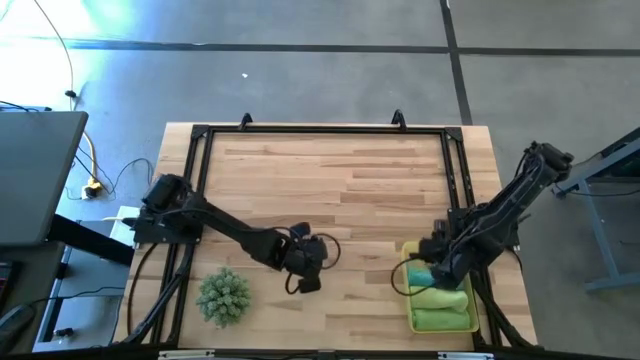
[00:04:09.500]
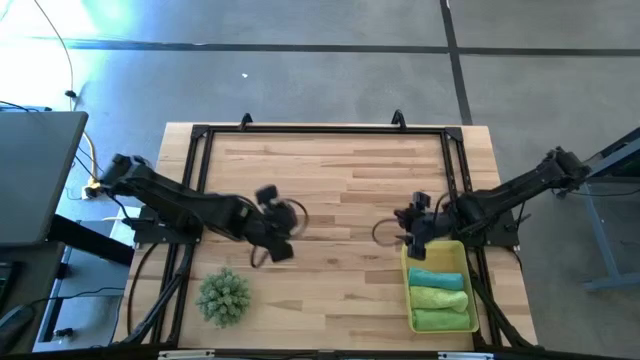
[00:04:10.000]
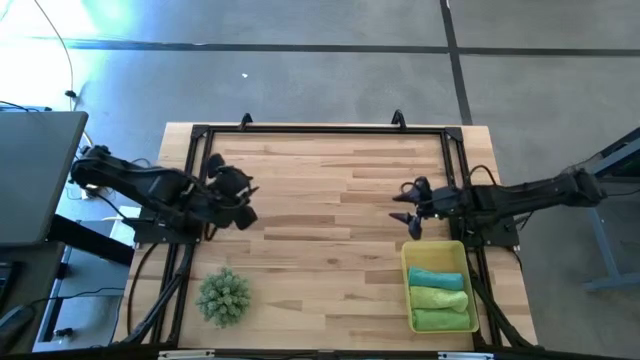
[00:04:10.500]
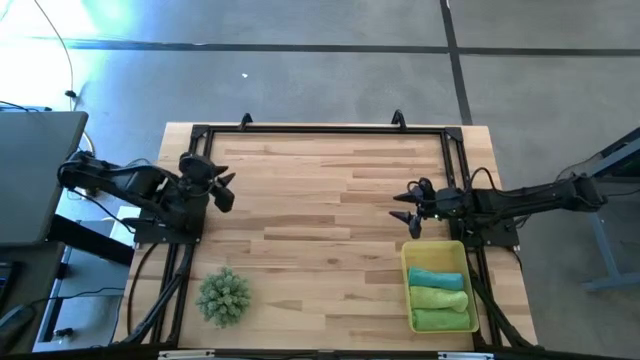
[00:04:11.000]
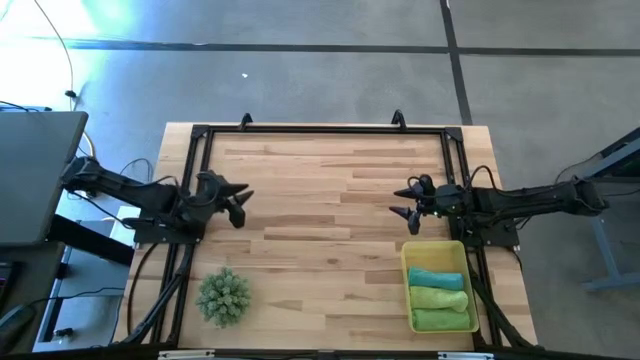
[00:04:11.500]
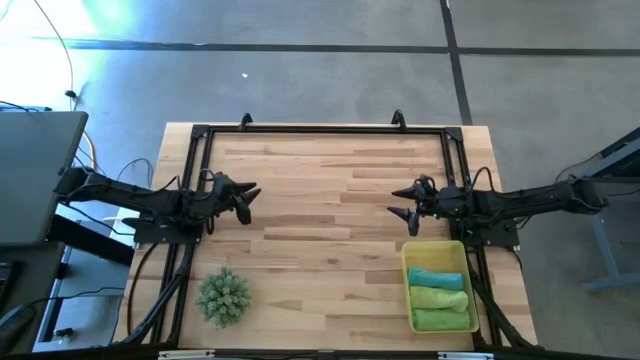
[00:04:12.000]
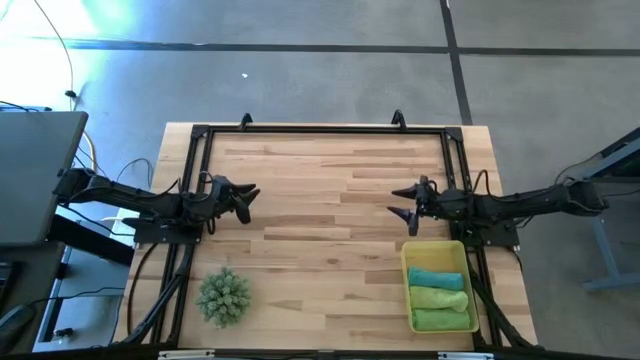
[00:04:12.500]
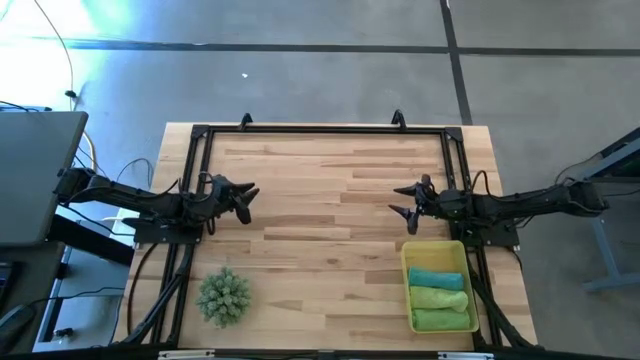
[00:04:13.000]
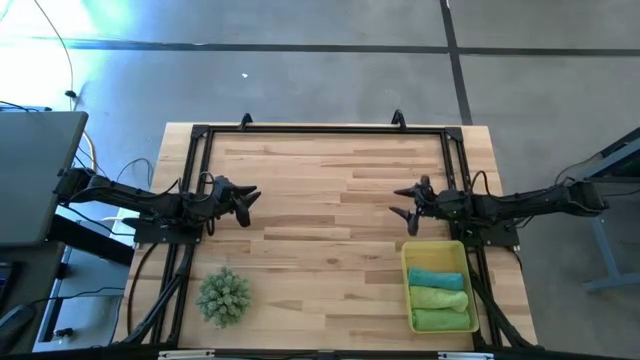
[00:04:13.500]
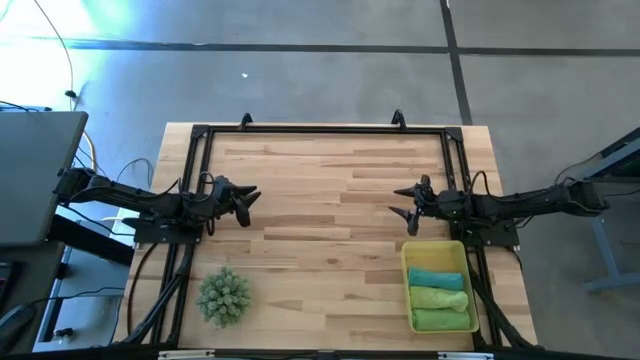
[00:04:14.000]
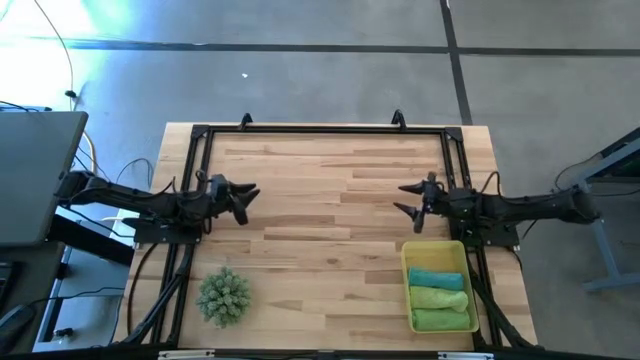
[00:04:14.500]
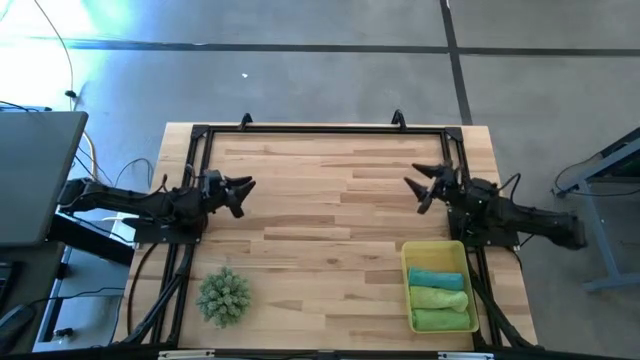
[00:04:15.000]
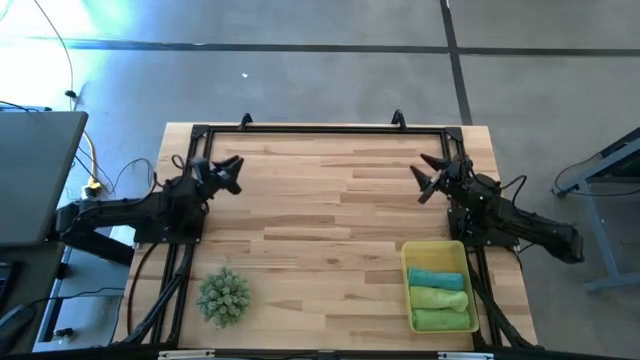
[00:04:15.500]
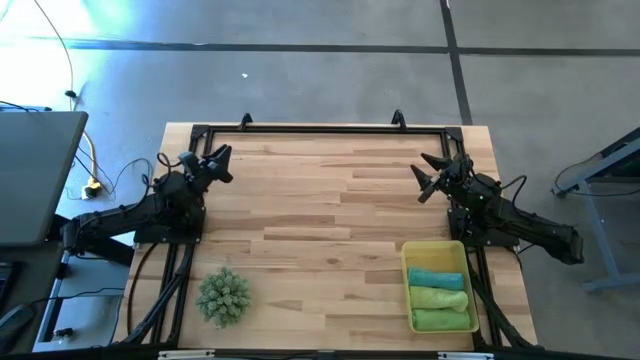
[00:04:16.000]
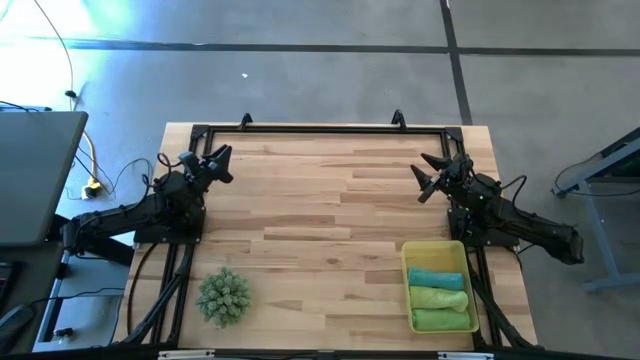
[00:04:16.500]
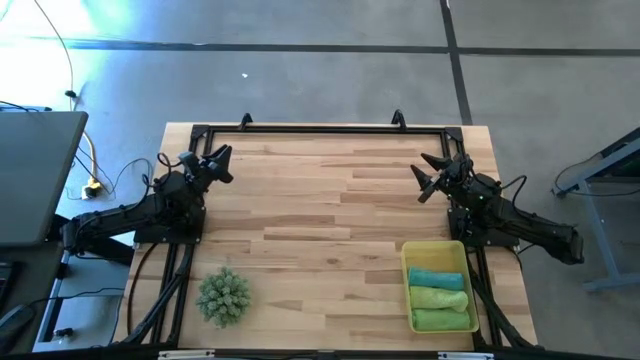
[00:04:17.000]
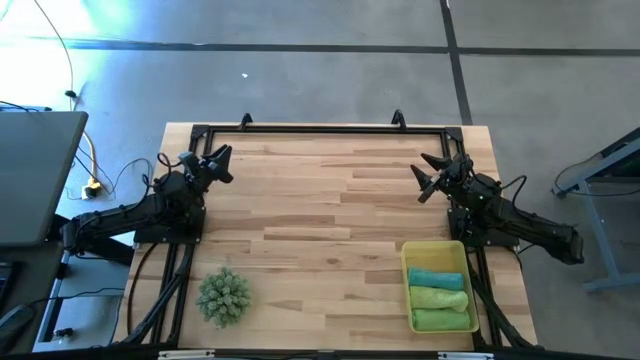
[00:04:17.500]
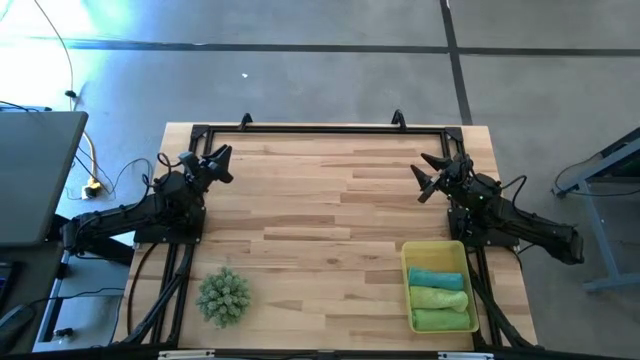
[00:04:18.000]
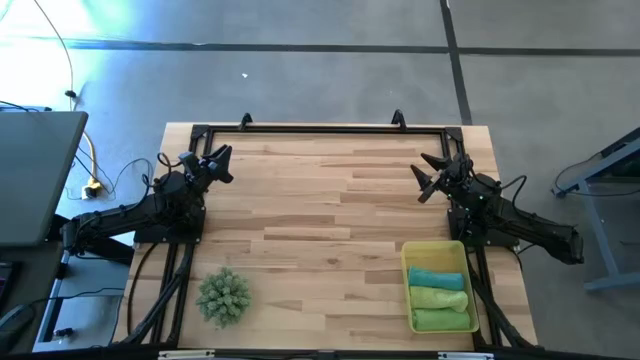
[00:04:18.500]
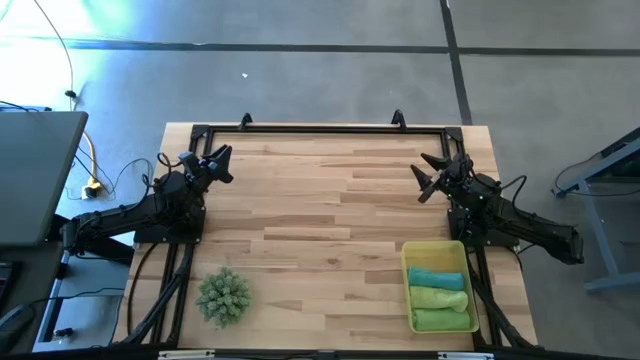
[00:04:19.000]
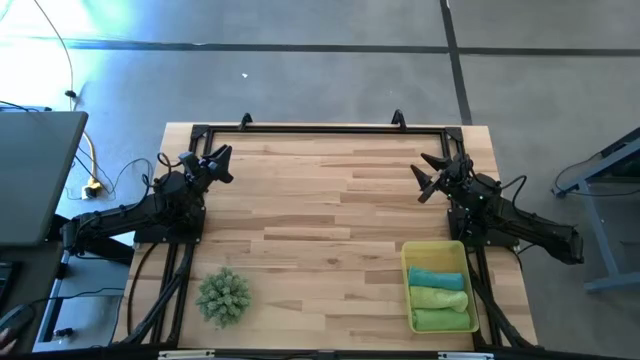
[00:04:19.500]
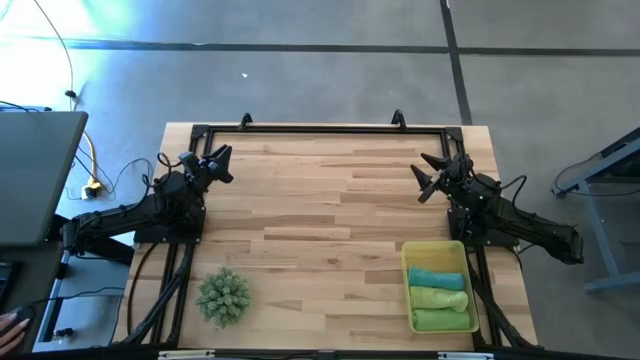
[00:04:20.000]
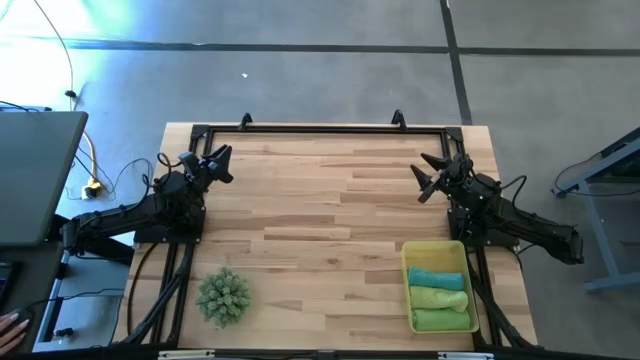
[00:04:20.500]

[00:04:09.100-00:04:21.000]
Task: Roll microfiber towels into tight, uniform cylinder then place into a basket
Return to Home Position

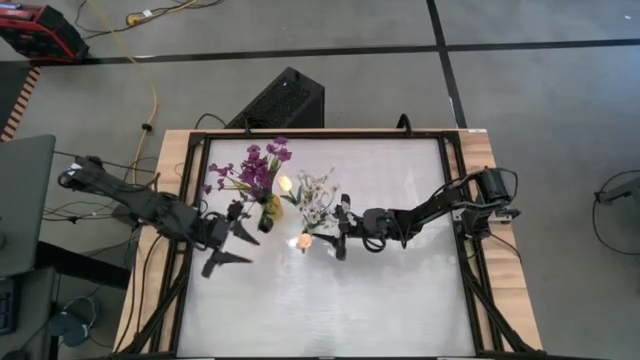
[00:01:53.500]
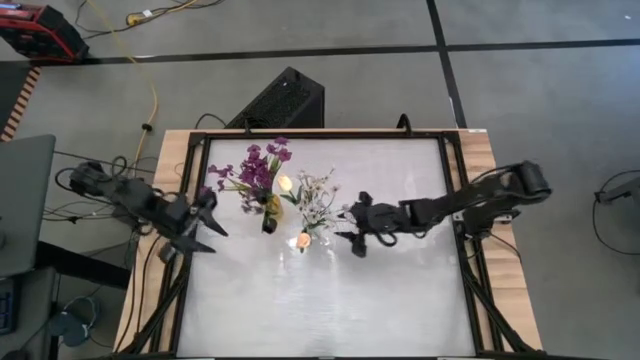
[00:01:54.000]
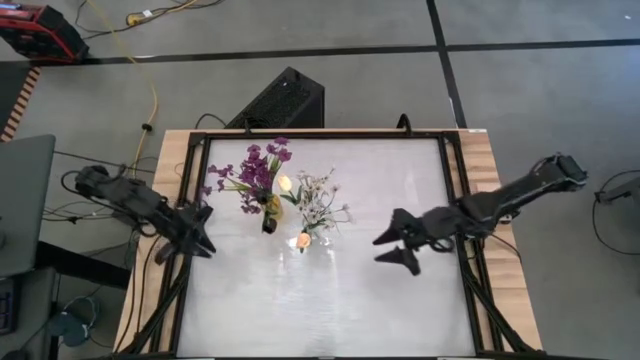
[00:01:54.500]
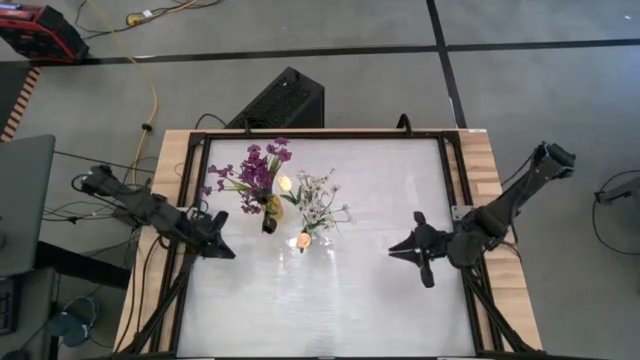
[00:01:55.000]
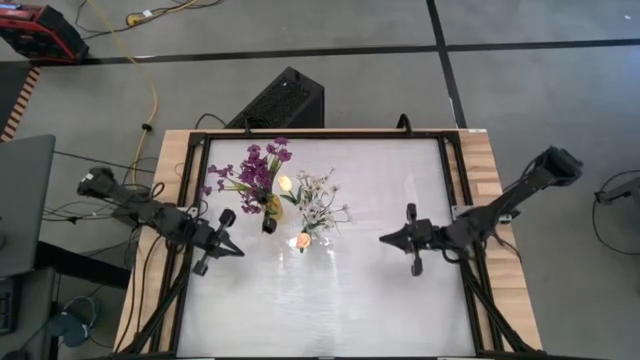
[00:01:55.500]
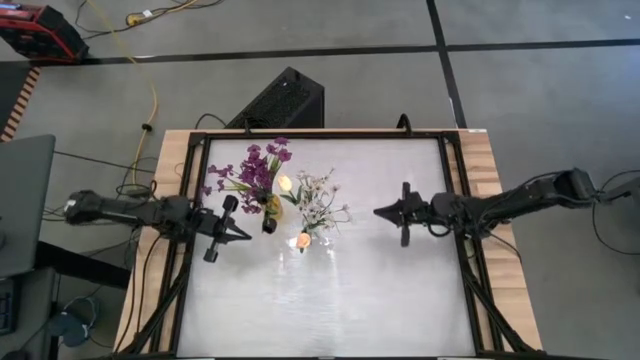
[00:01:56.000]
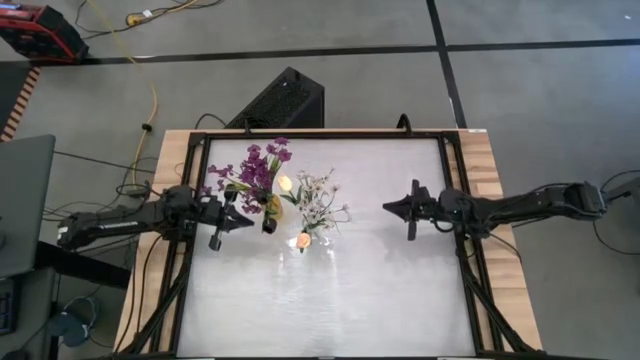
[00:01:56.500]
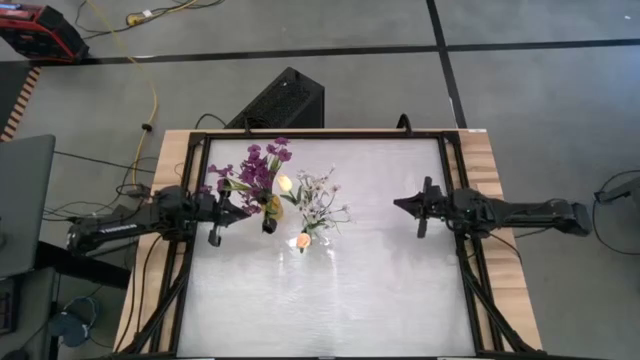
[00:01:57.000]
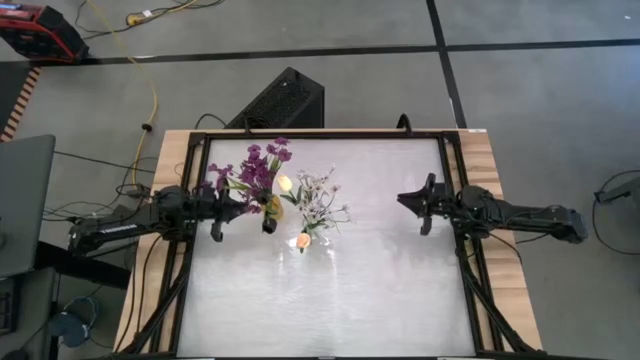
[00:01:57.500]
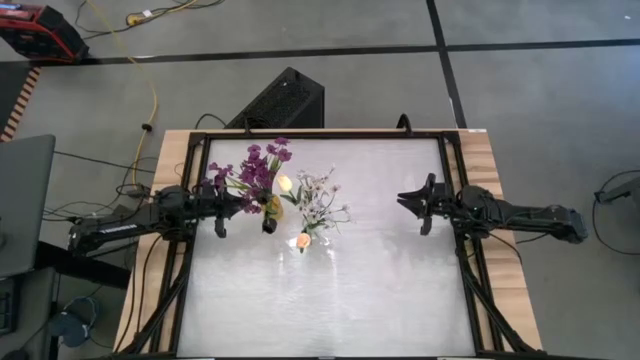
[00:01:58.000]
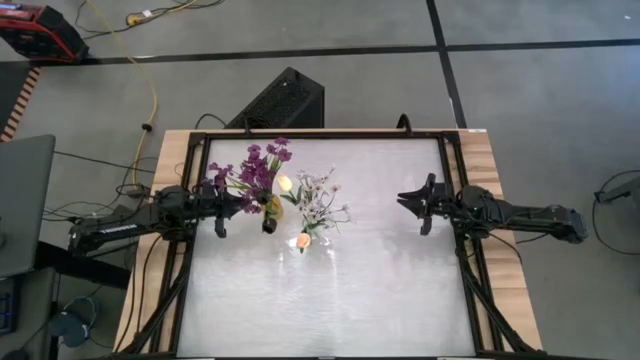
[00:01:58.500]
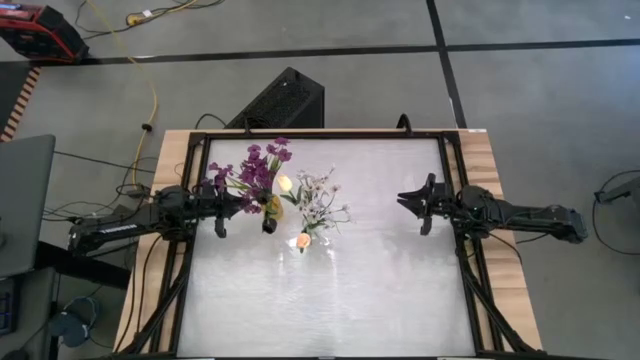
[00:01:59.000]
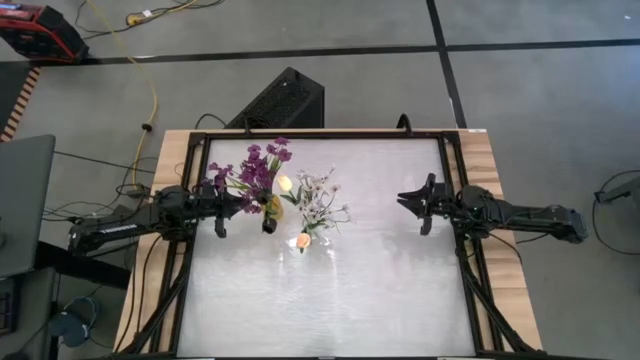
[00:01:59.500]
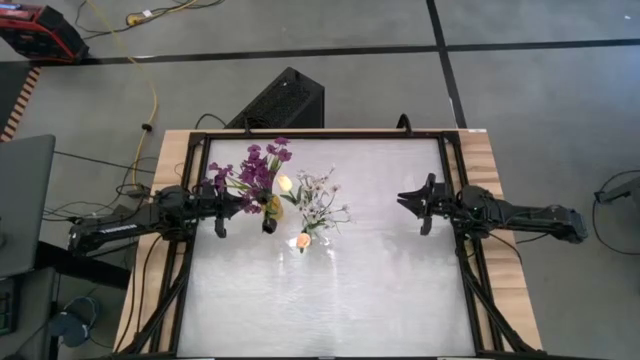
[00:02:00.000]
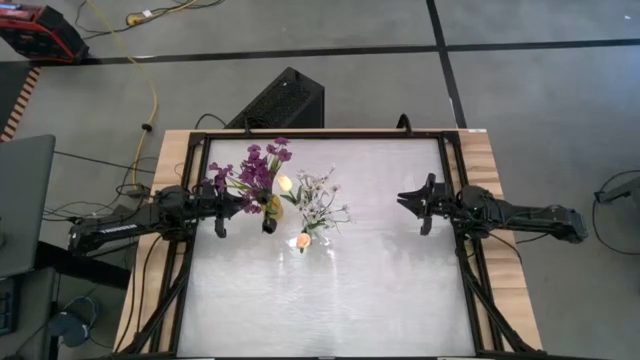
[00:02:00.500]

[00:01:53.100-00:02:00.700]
Task: Sort flowers into vase by color
Return to Home Position
